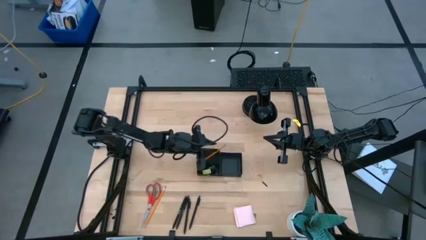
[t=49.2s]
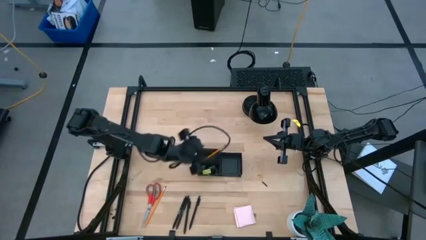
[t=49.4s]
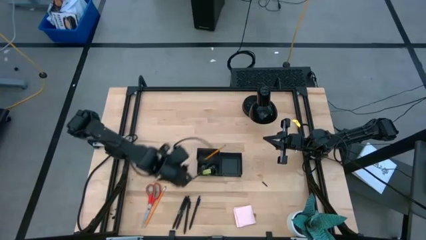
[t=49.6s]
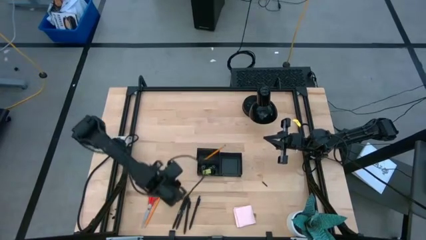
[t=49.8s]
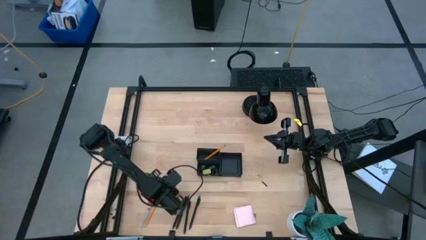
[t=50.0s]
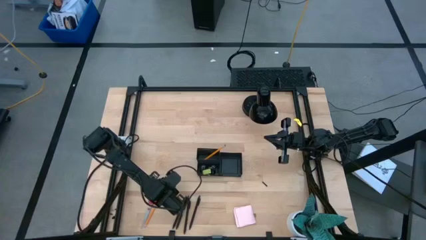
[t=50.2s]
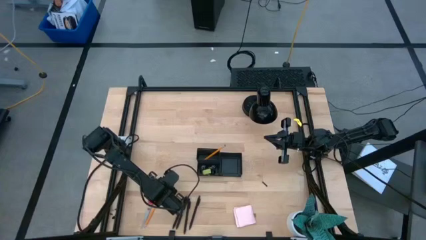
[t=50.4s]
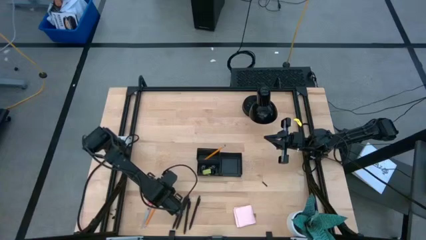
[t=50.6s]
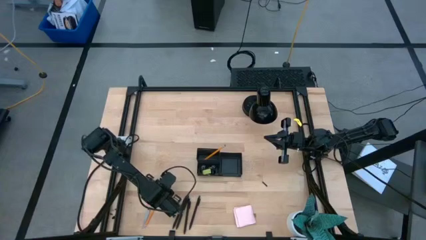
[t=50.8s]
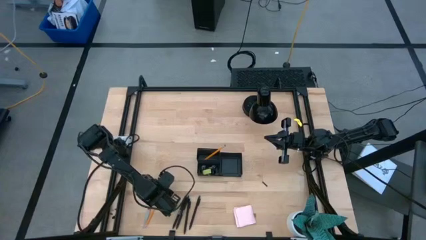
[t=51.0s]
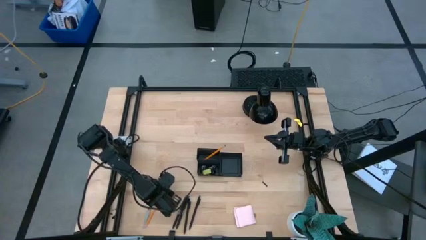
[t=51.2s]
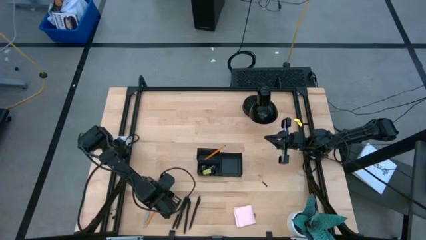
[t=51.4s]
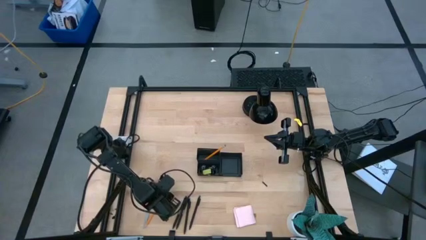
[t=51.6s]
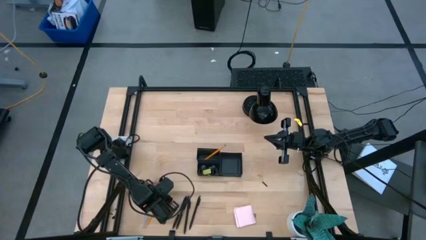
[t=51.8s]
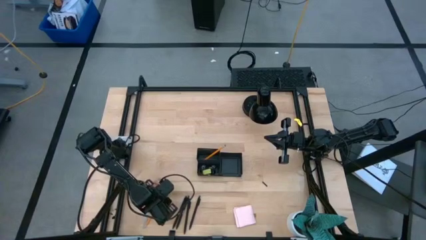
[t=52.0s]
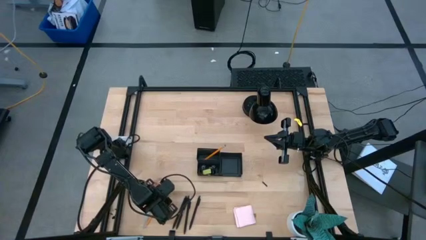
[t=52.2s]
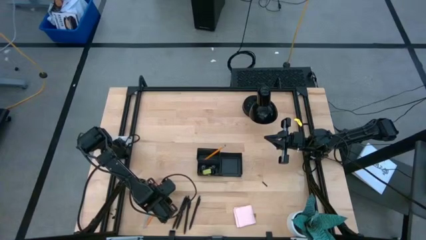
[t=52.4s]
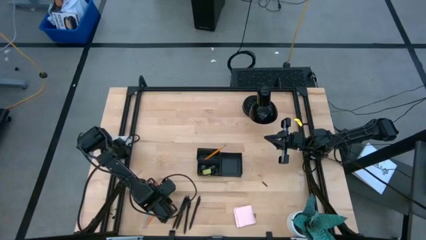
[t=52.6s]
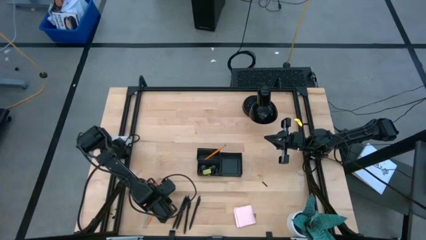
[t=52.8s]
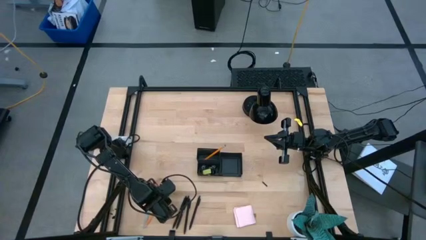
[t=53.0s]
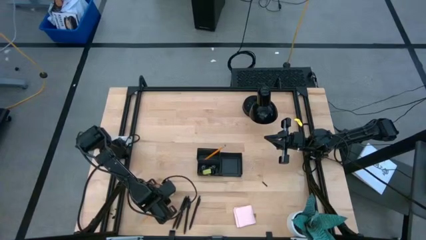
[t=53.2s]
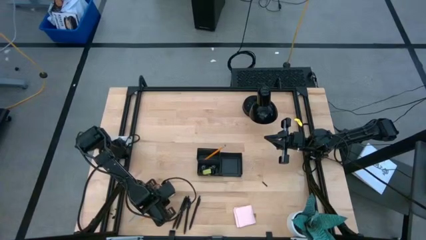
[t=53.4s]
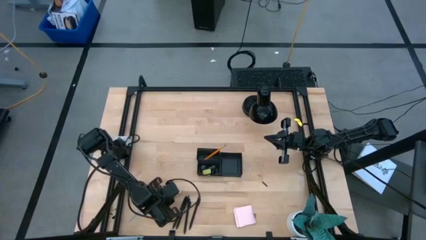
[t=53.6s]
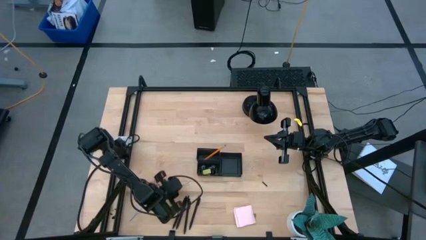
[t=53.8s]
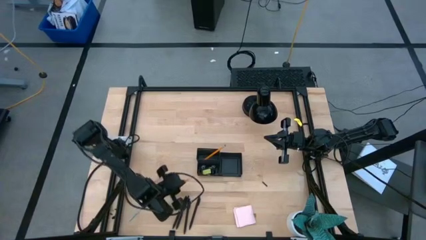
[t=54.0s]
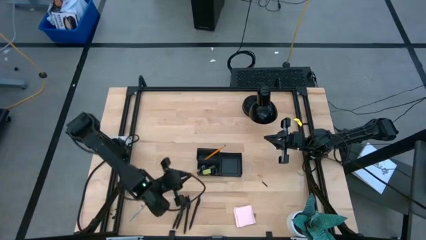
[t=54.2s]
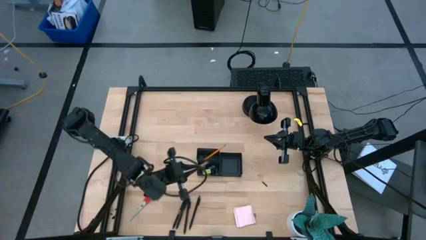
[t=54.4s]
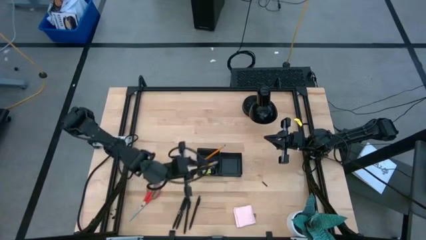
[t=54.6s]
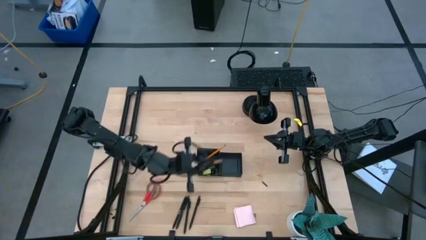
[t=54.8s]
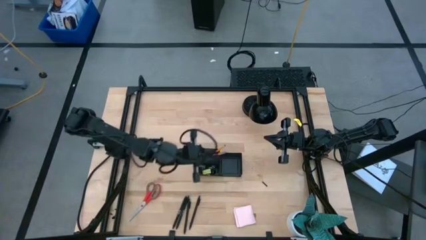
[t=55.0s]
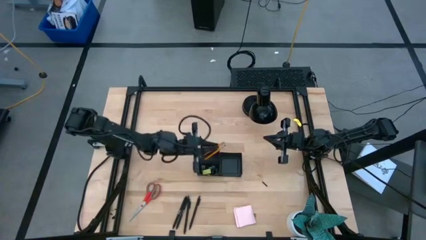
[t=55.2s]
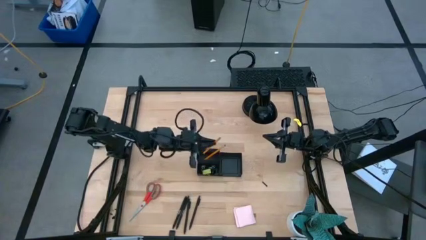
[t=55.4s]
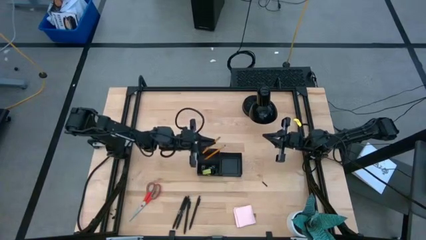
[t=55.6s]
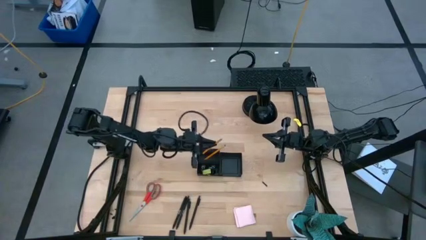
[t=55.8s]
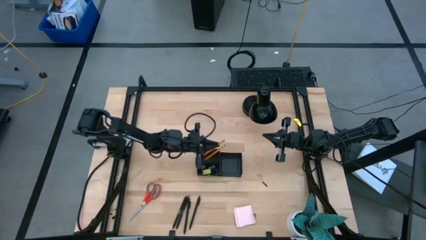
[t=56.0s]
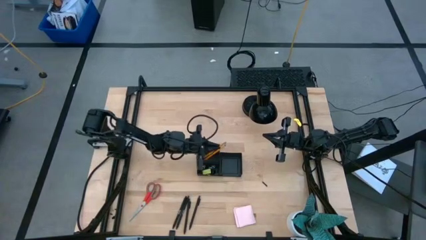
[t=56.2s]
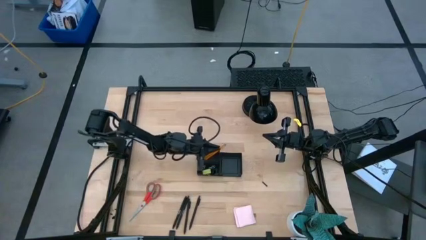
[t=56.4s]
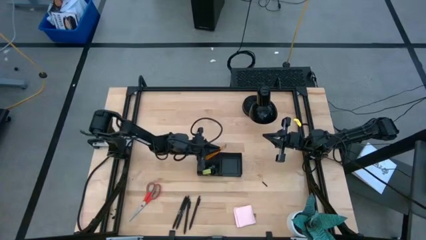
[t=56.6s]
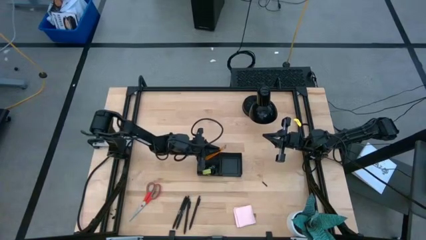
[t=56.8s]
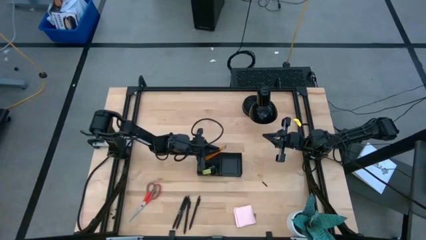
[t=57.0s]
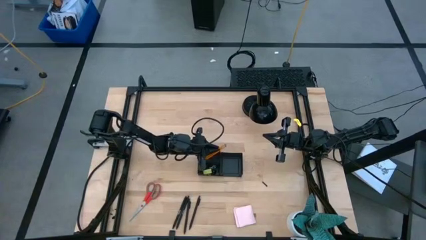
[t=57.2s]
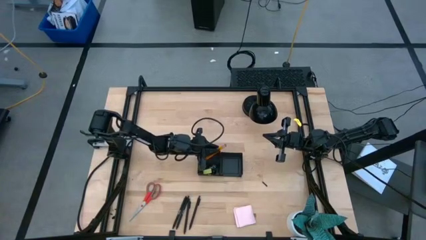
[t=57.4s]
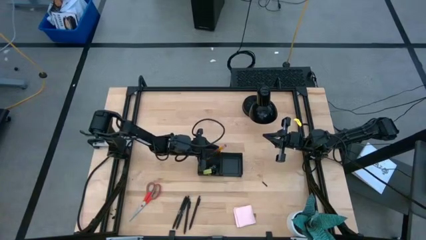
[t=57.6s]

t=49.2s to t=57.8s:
Task: Pick and place office supplies into organizer
Put the yellow pencil into the black desk organizer

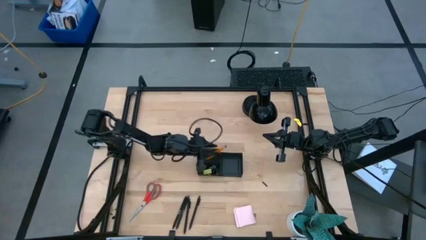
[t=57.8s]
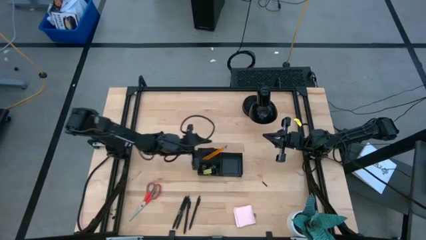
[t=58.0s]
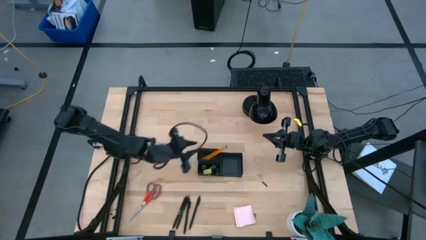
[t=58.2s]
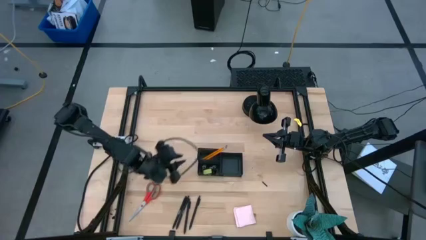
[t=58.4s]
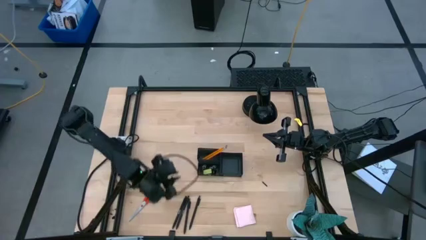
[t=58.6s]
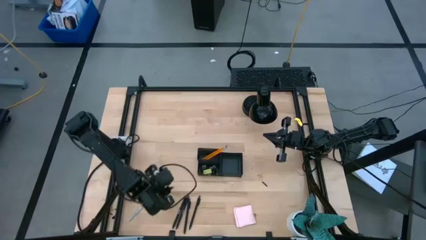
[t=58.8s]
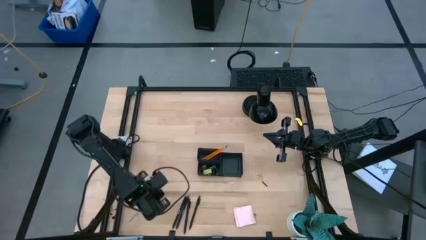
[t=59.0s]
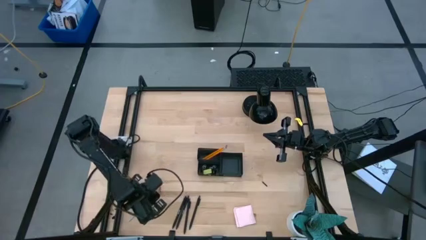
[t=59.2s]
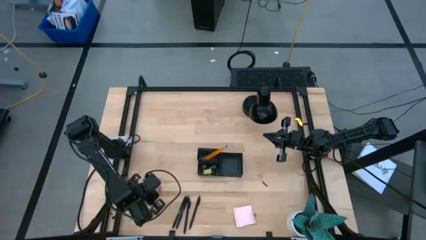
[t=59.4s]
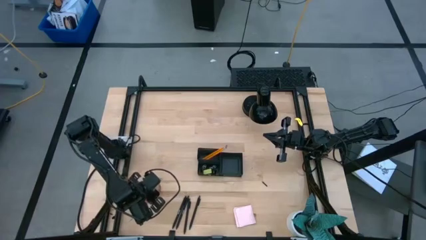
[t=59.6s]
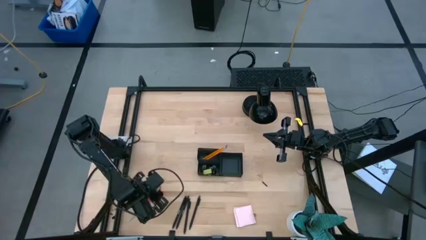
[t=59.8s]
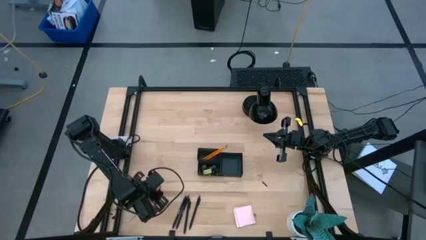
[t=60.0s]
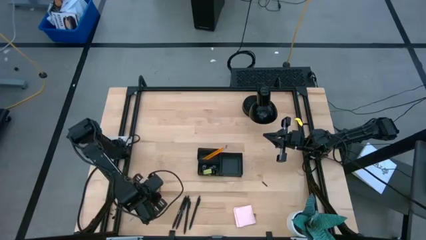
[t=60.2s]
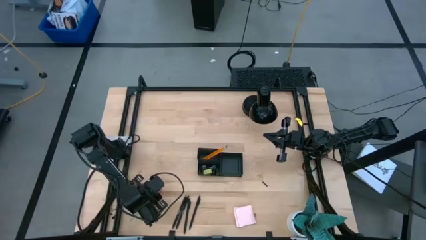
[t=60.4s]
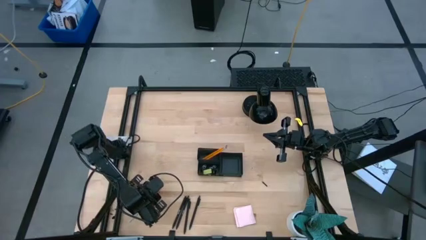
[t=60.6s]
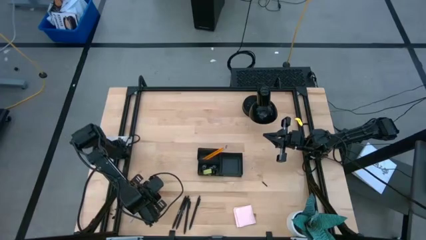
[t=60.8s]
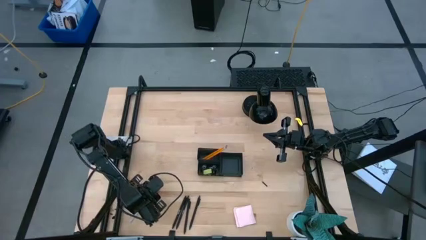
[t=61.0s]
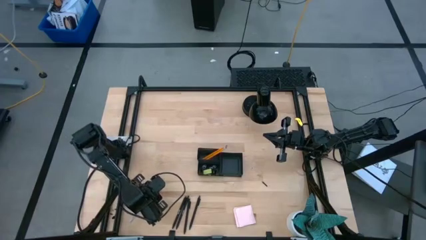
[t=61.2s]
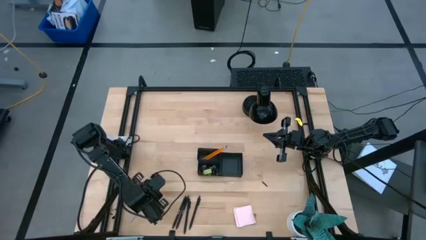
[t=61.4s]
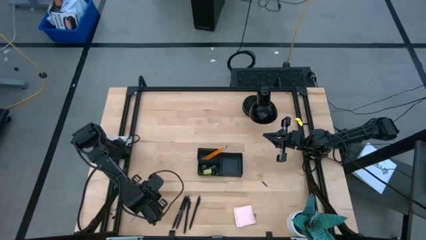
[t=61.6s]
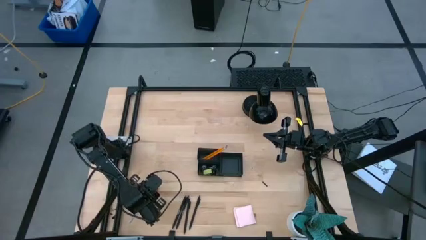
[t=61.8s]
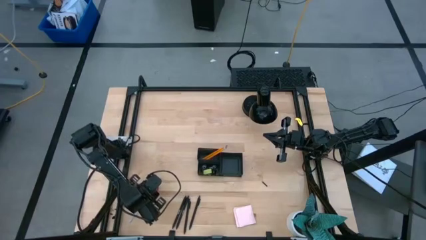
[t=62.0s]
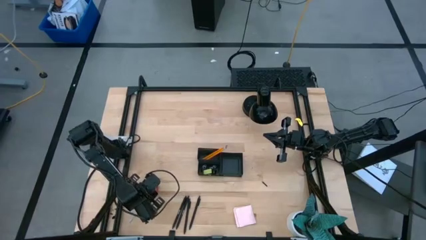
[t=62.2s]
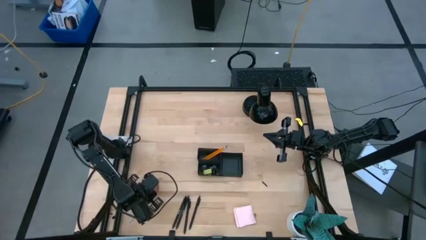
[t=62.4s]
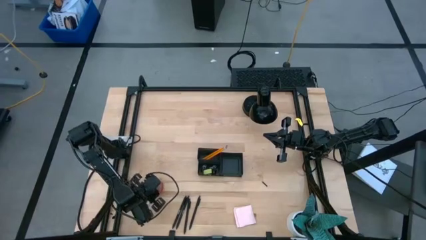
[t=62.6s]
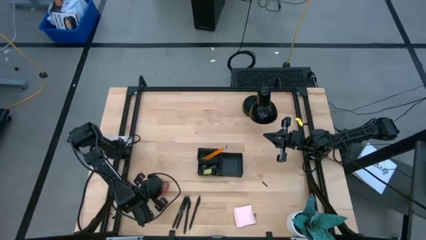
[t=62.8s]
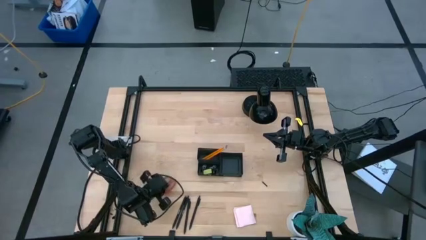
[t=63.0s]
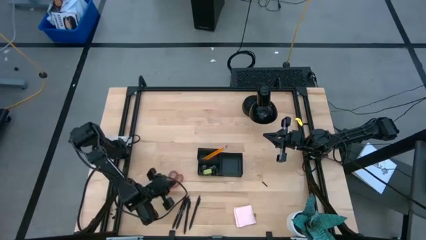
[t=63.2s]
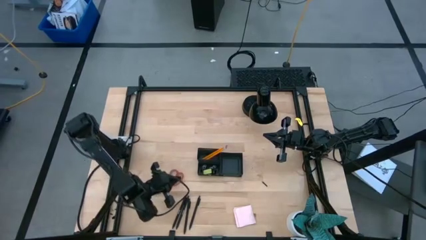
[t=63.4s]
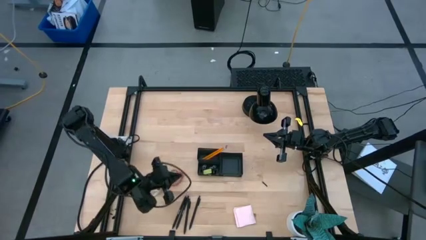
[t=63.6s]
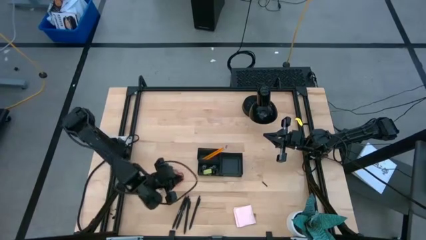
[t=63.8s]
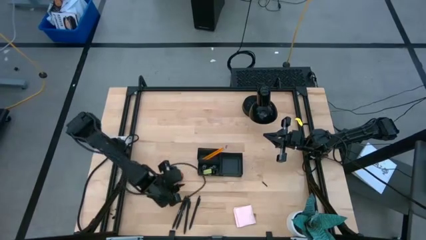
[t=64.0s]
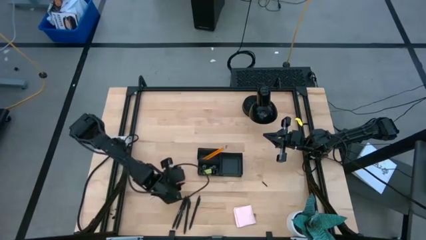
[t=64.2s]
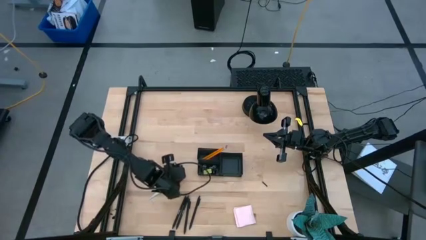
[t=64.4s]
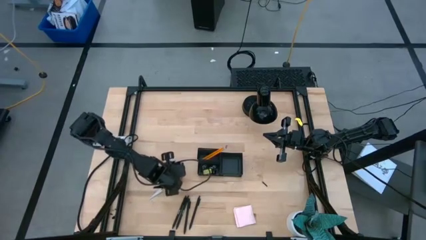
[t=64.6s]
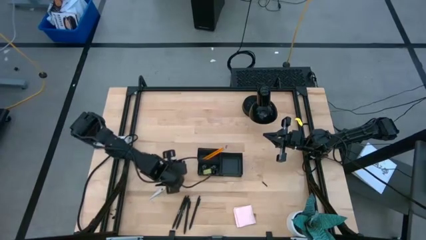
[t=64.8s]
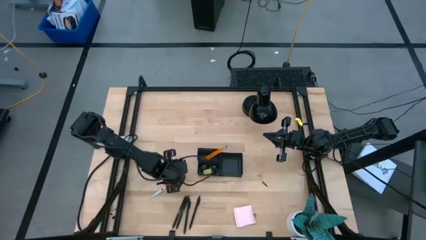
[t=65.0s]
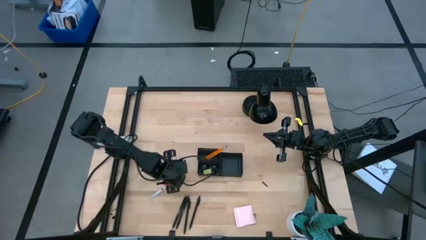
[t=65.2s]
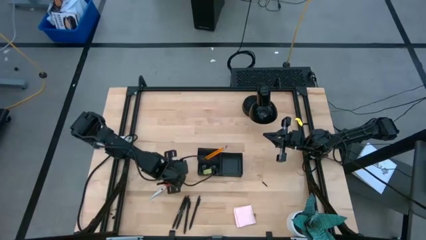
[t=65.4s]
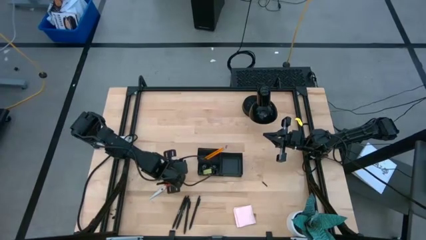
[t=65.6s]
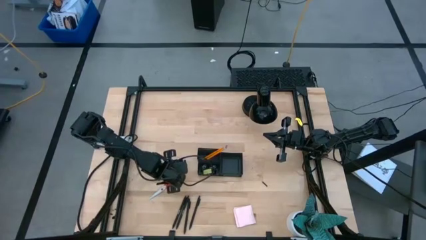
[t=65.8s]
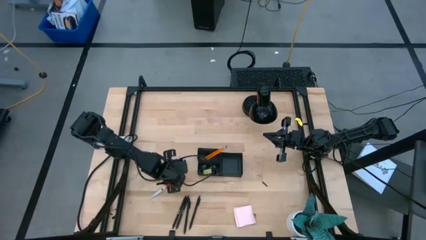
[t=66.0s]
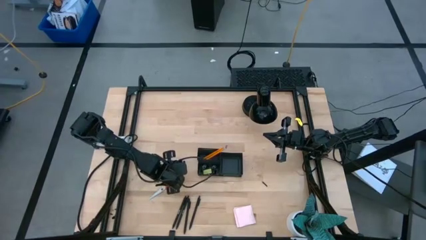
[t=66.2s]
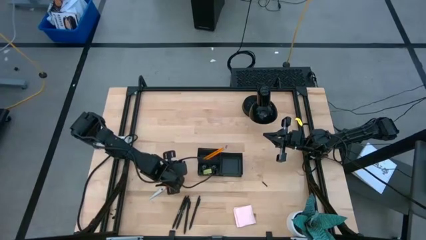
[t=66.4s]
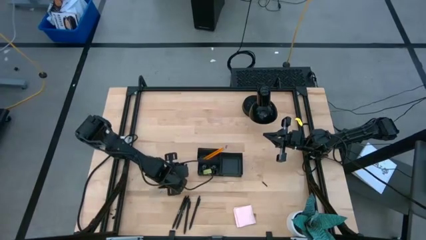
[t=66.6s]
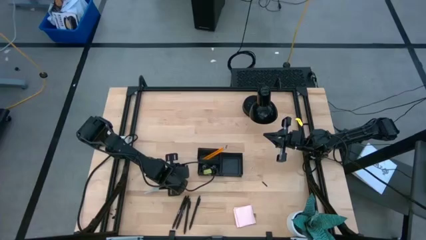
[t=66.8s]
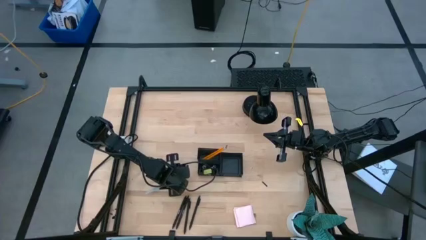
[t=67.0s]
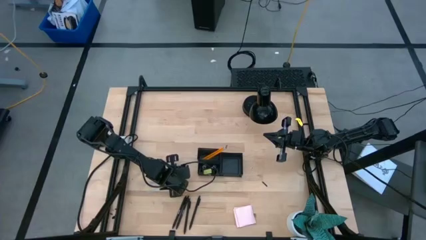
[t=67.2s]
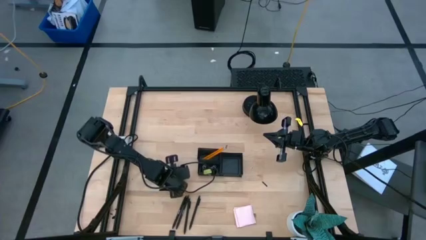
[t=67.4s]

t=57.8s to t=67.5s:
Put the red scissors into the black desk organizer
